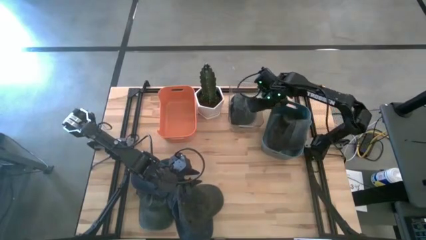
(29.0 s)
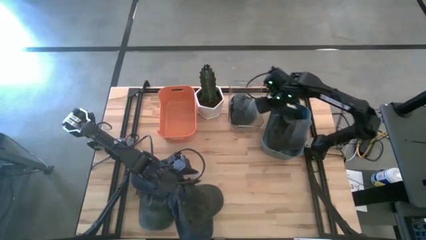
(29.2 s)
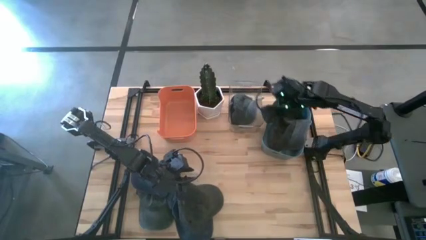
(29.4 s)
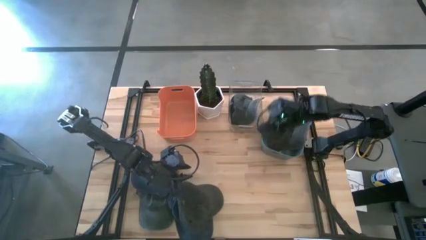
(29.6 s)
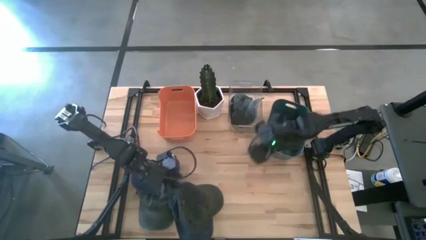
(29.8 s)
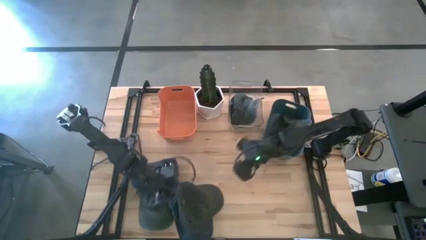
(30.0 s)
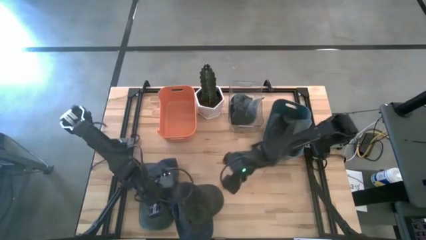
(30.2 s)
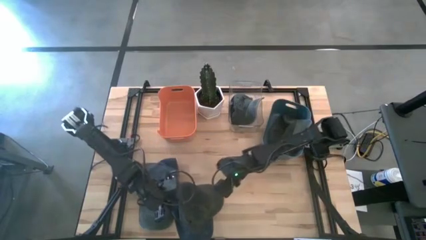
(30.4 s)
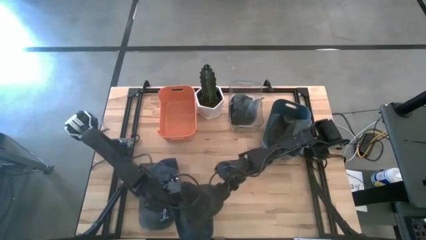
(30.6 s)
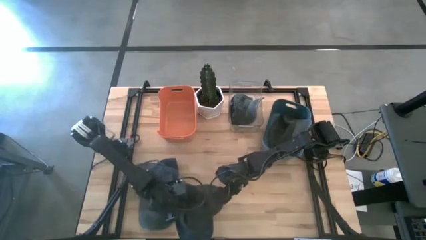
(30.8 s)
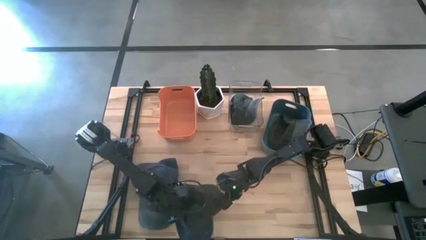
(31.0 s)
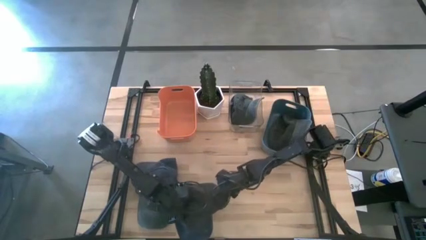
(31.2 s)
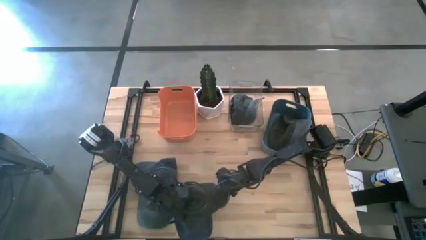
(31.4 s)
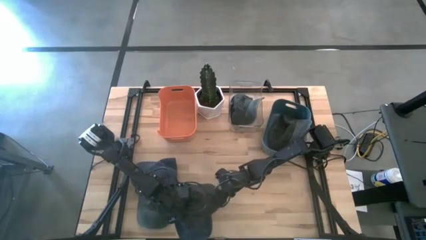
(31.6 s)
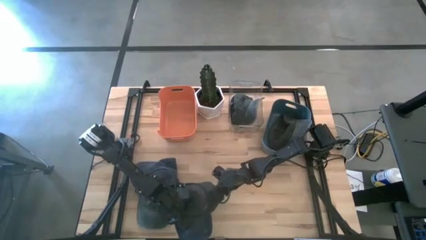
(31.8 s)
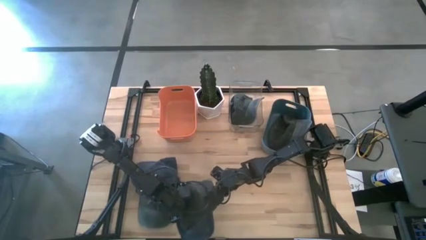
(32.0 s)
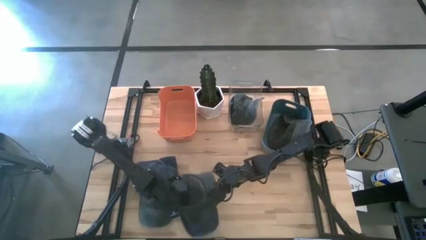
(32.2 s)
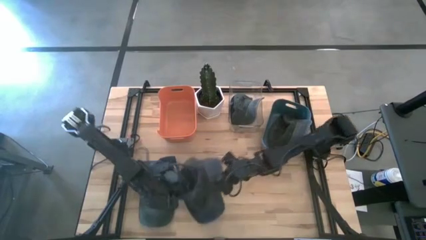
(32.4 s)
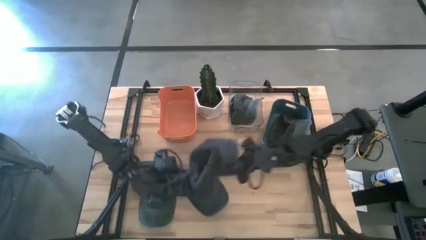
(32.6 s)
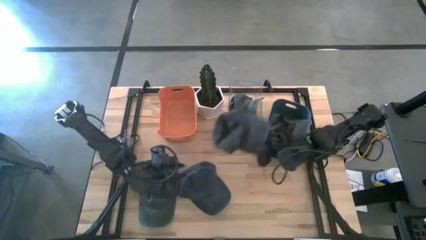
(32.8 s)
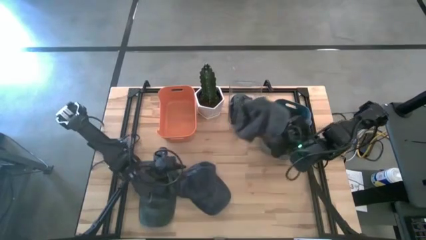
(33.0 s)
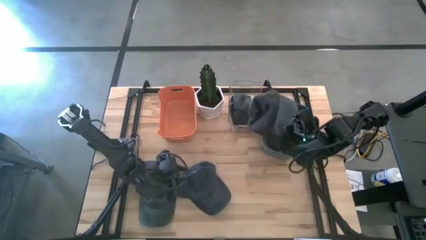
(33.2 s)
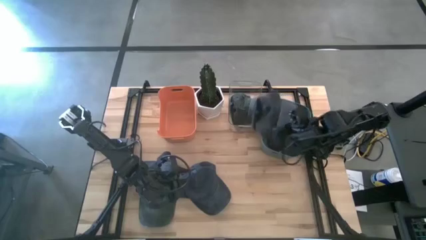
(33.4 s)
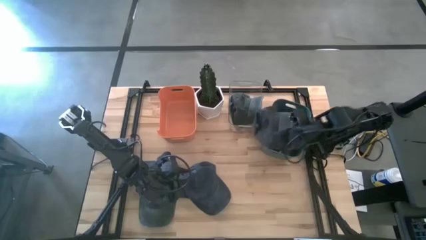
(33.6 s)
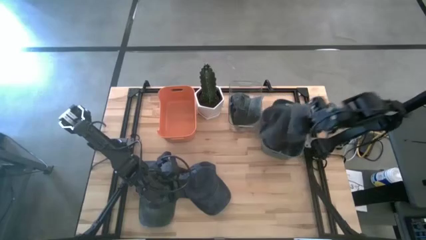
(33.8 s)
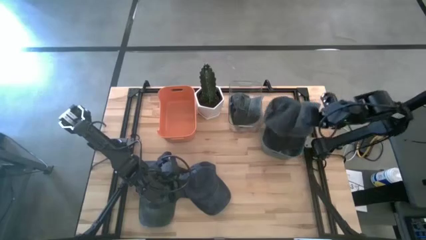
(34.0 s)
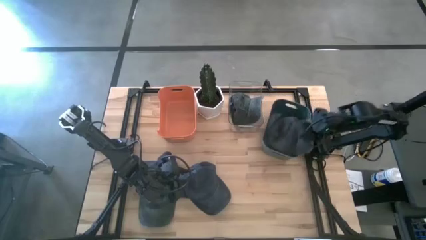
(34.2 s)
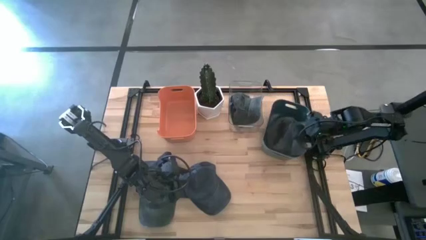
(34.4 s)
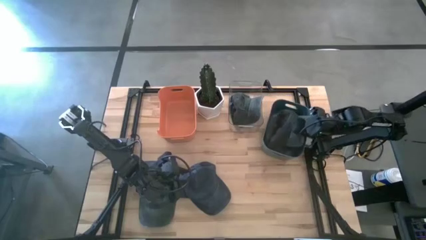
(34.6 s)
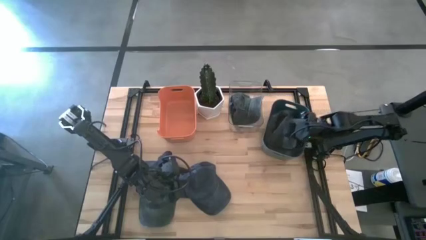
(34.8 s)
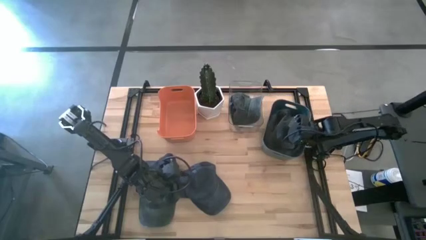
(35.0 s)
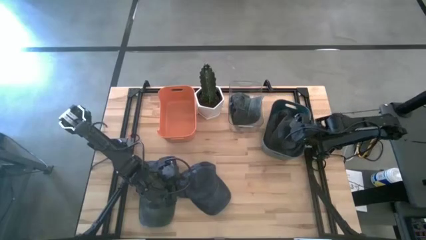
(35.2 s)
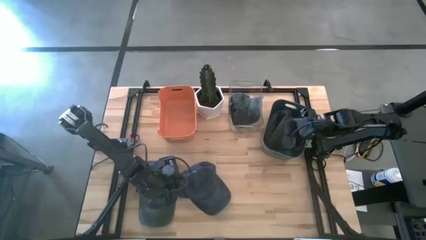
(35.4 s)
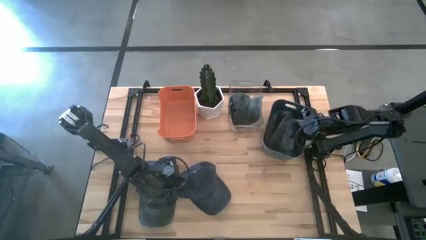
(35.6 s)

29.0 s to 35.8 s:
Task: Pick & Place hat
Put the black cap into the blue bin

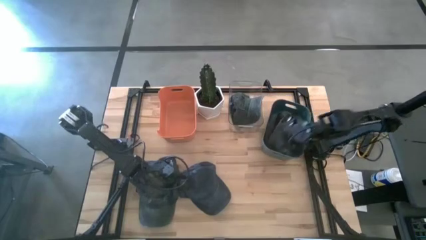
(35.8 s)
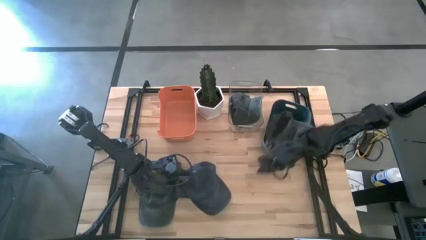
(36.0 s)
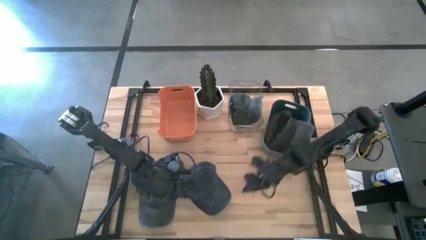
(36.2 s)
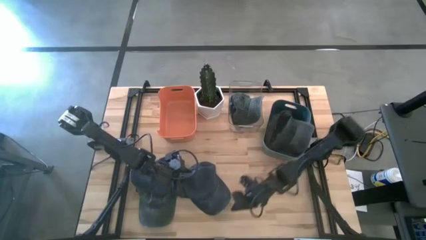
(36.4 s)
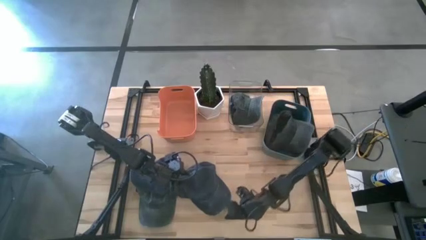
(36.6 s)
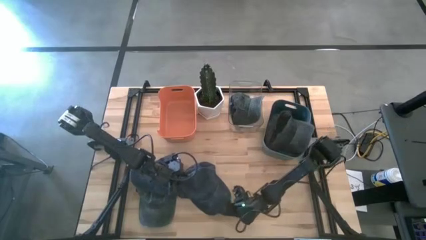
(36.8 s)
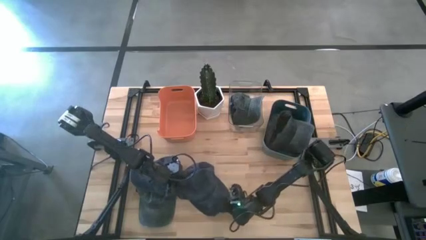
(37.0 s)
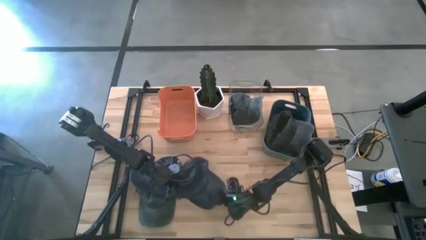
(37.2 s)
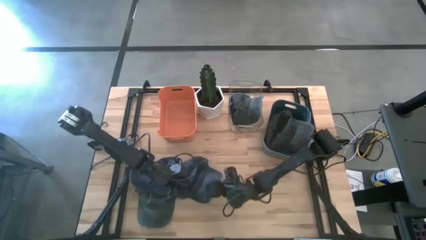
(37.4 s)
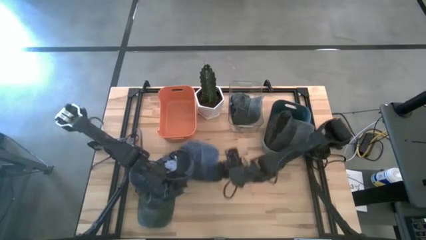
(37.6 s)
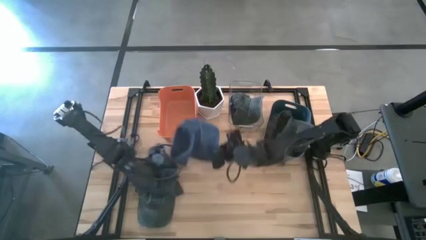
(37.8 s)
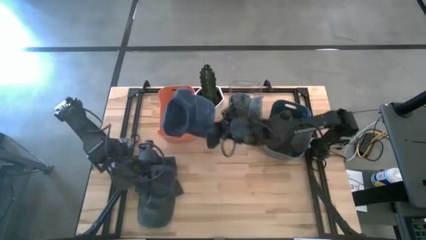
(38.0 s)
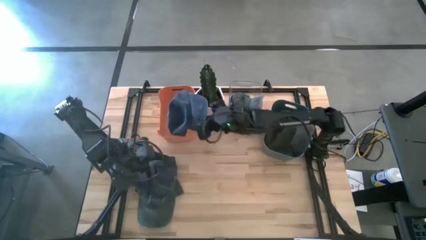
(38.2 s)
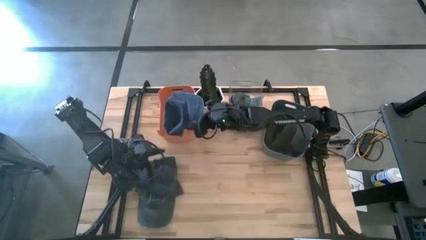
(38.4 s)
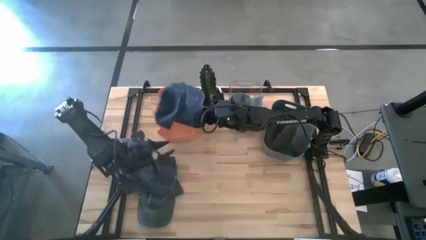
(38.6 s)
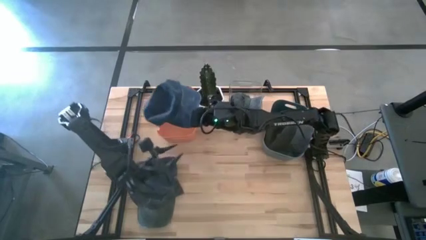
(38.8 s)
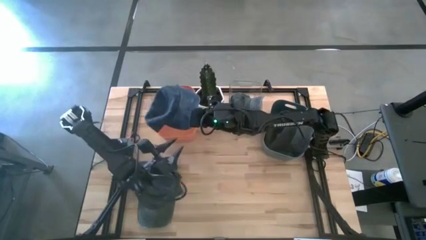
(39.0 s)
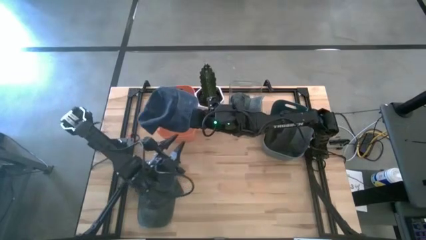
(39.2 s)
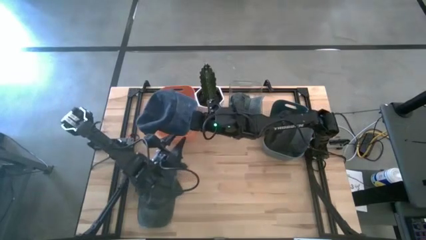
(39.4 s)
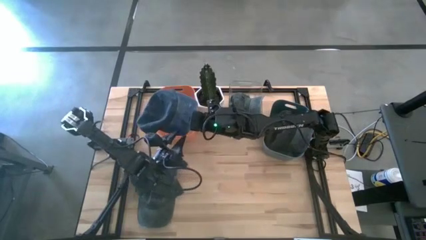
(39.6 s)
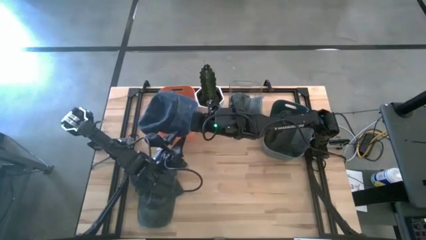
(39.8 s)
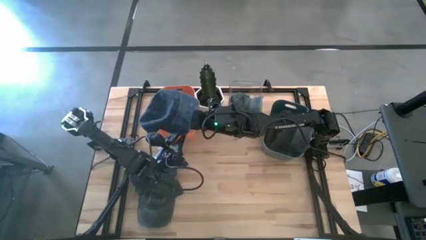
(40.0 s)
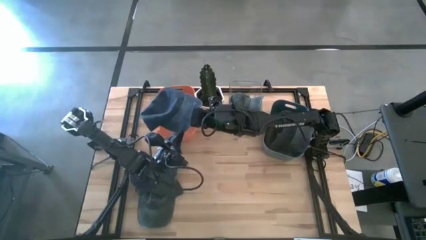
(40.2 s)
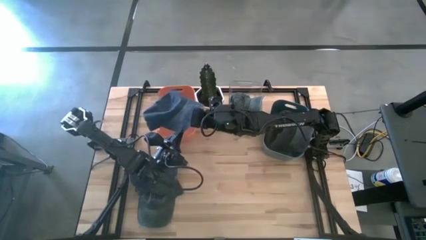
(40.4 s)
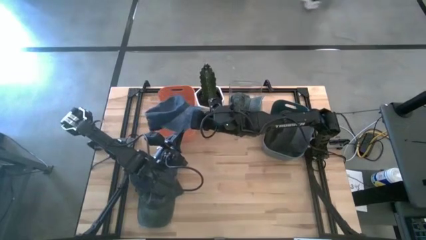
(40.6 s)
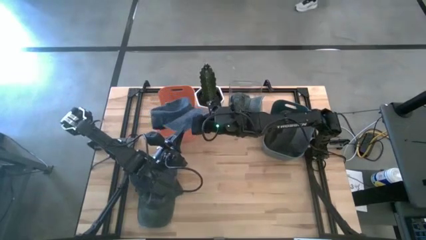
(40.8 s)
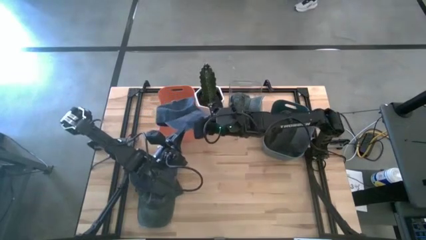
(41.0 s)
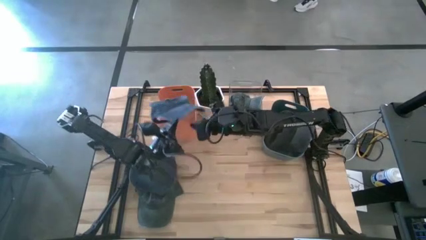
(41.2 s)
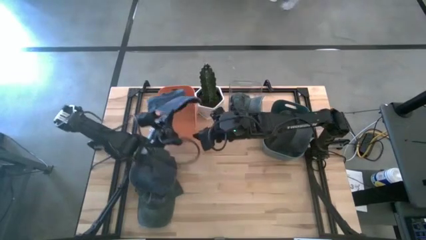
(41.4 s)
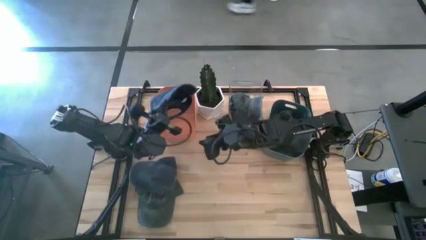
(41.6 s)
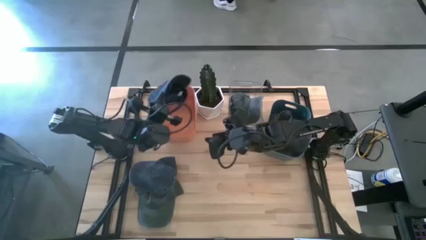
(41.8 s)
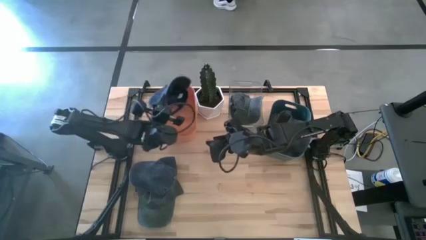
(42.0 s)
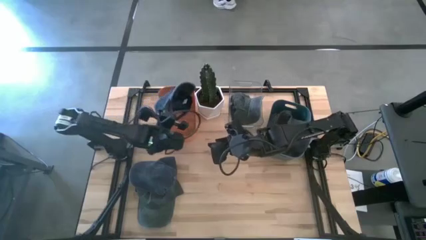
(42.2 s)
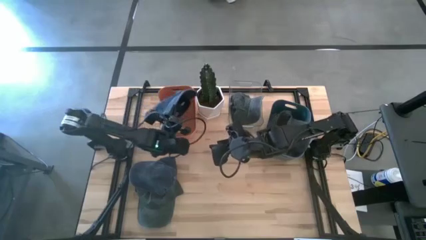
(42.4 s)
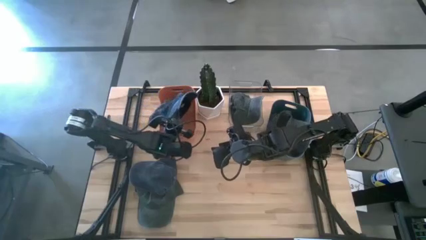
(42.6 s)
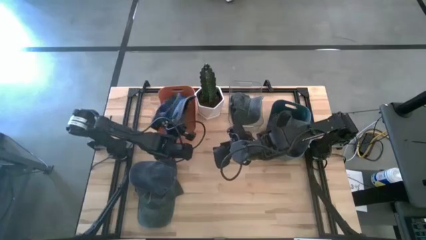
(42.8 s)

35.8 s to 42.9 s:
Put the dark blue cap into the orange bin

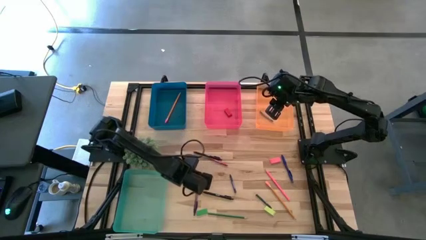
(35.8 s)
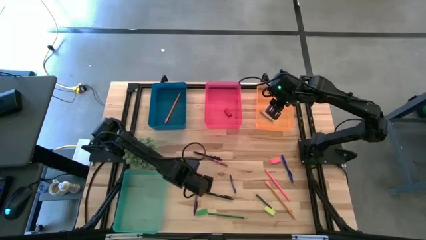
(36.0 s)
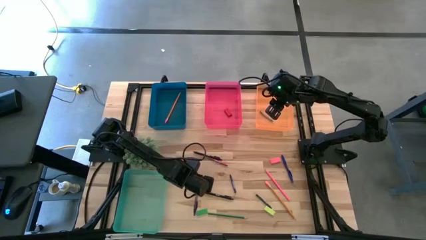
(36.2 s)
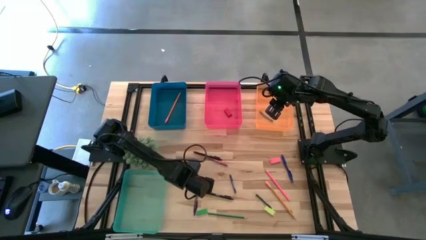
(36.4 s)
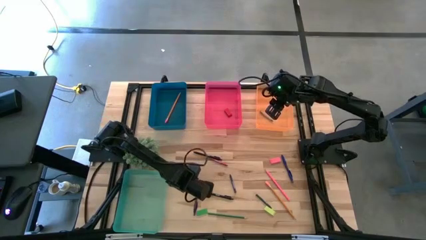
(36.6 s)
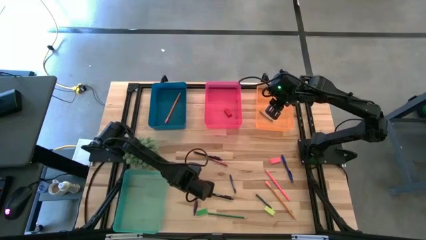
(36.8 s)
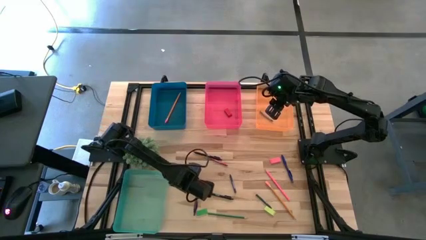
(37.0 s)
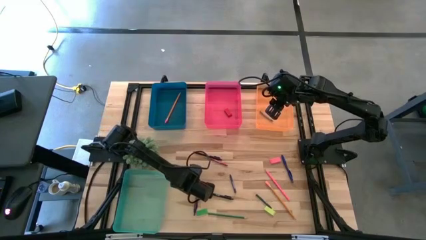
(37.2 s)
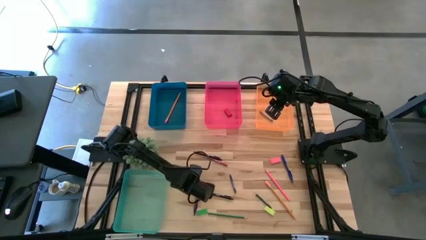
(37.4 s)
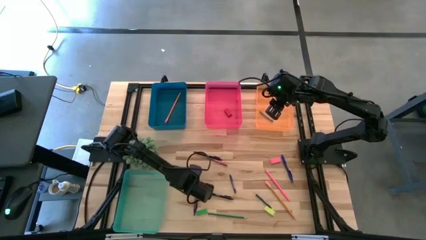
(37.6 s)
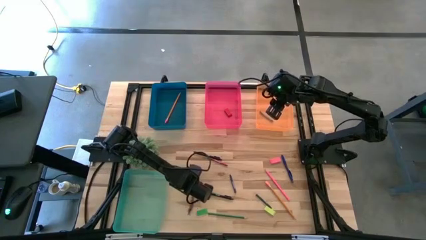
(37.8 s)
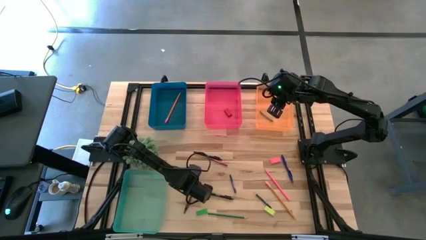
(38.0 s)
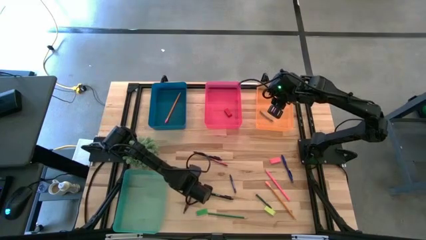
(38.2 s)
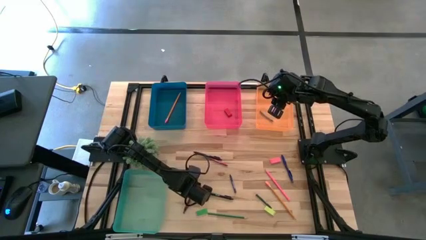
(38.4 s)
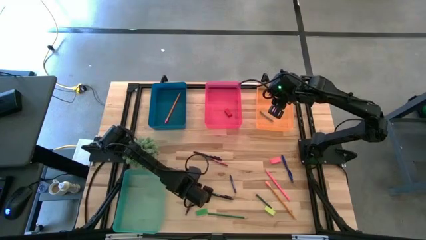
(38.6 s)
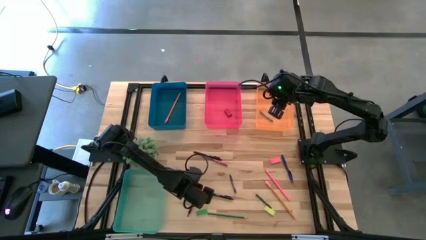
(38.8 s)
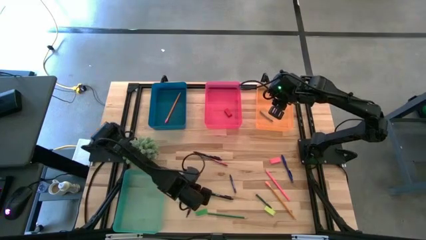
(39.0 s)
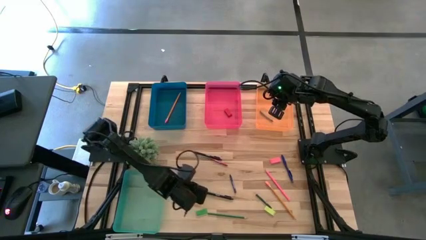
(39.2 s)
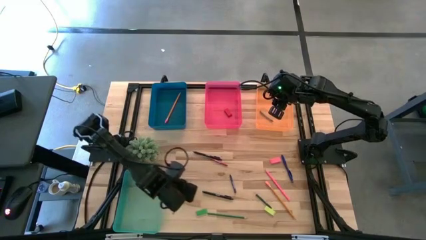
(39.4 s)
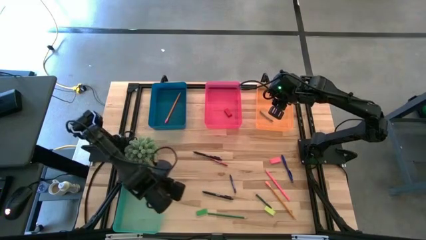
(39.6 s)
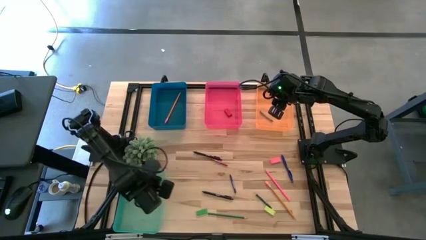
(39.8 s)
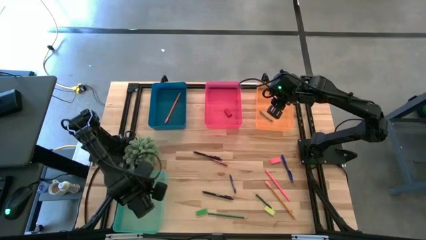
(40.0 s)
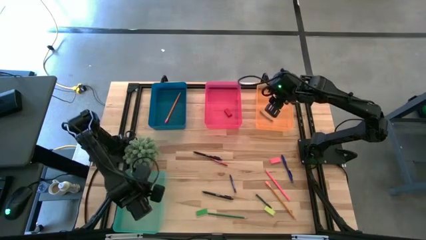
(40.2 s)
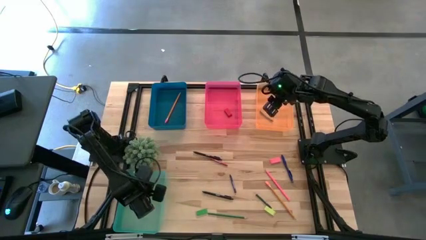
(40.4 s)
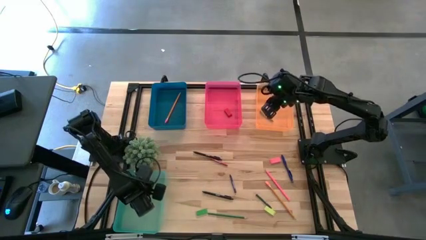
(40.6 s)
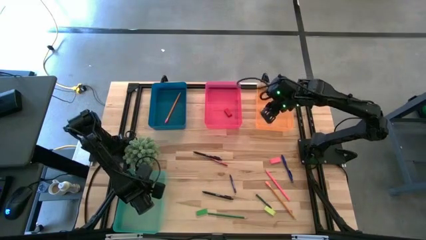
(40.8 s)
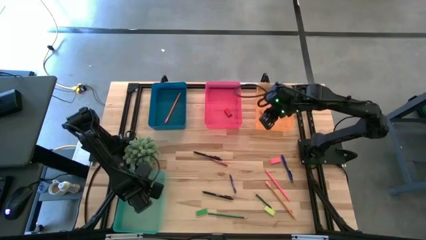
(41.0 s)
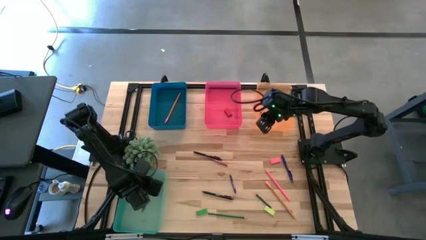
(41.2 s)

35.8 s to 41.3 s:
Task: Sort crayons/erasers/pens/pencils in bins
Put the violet pen into the green bin
